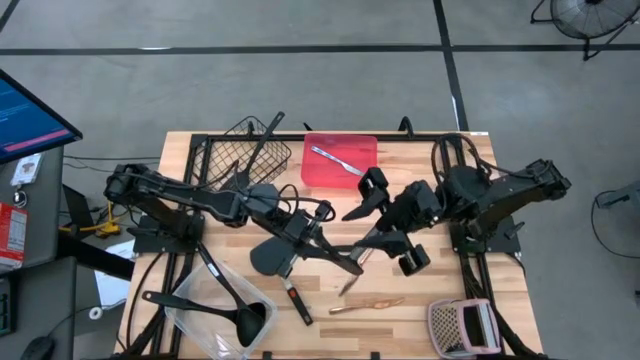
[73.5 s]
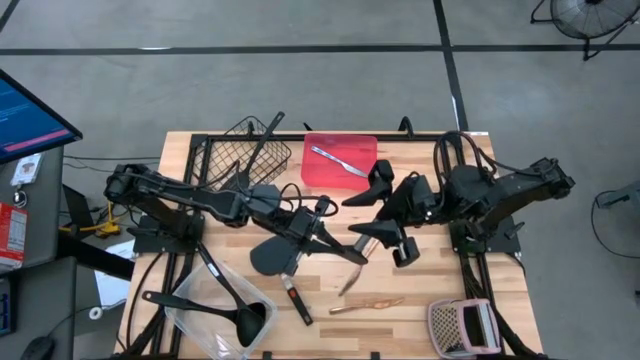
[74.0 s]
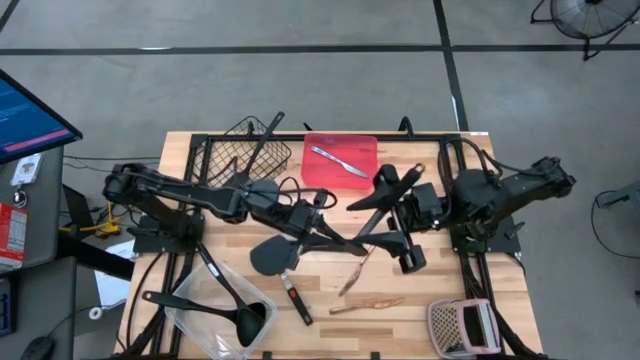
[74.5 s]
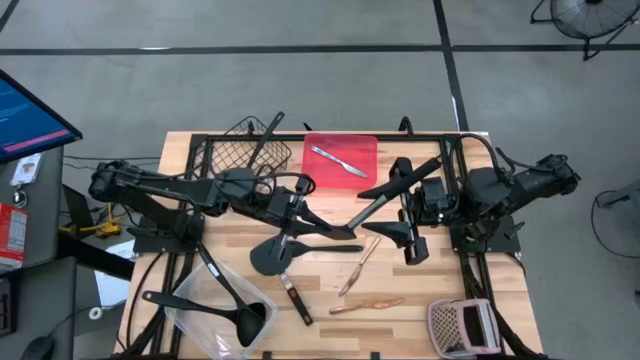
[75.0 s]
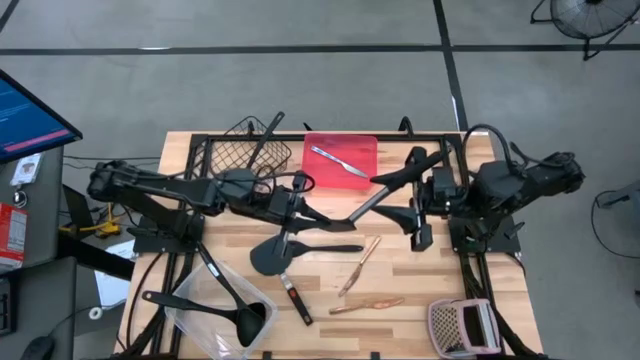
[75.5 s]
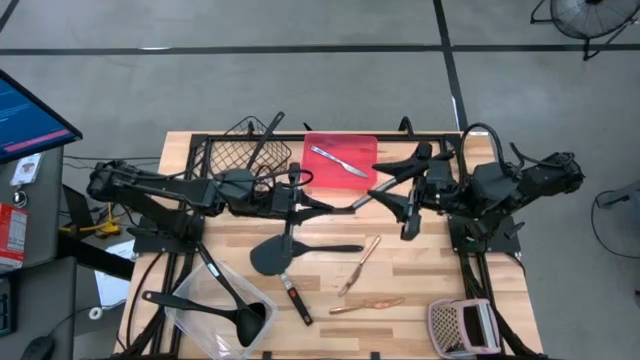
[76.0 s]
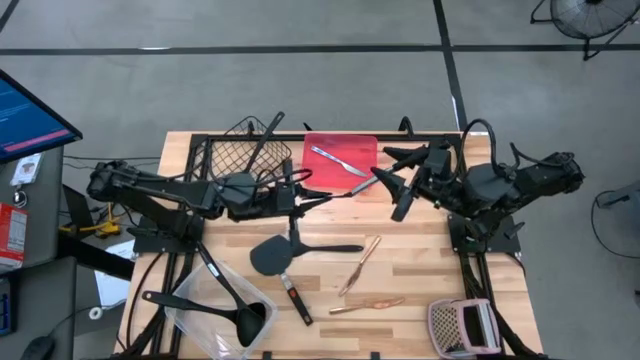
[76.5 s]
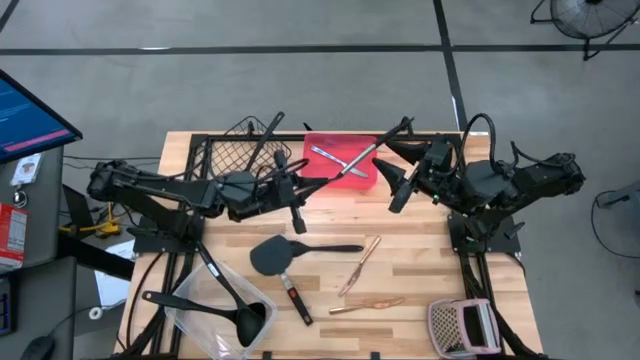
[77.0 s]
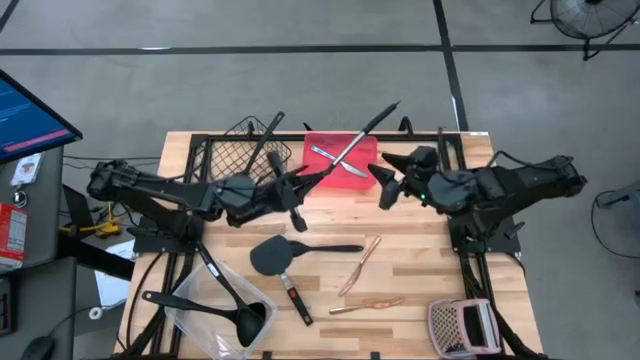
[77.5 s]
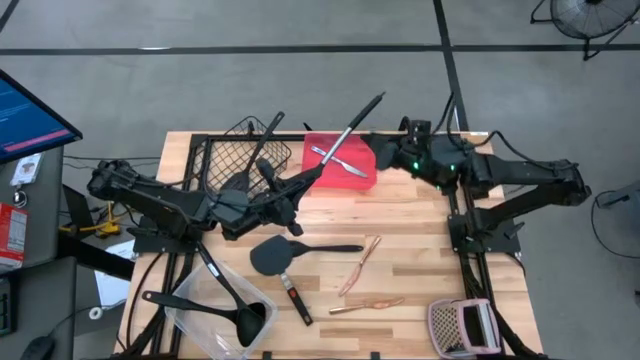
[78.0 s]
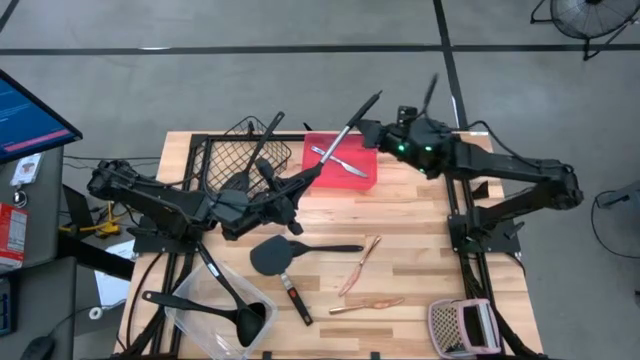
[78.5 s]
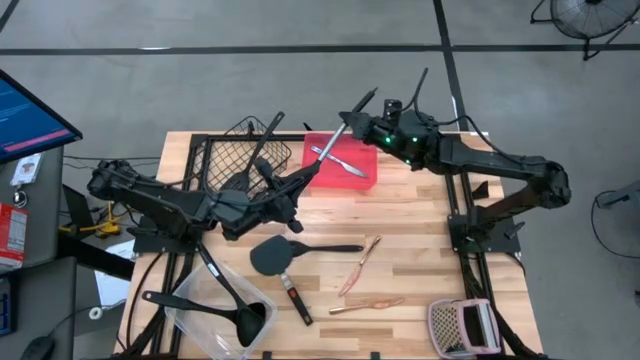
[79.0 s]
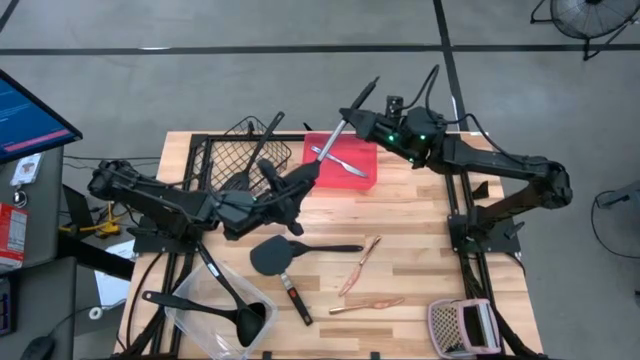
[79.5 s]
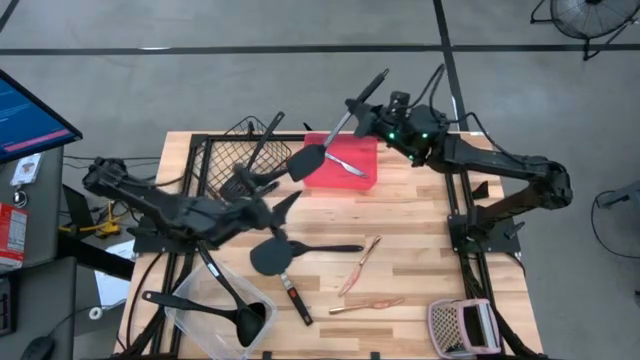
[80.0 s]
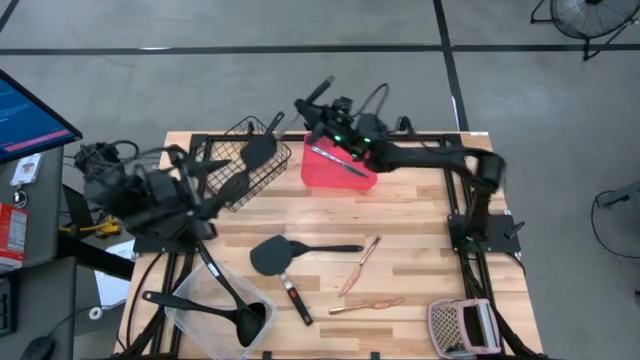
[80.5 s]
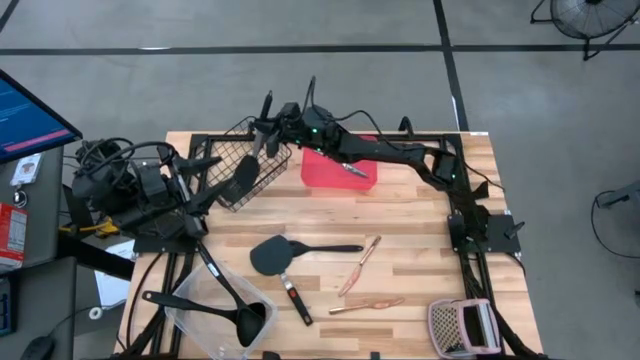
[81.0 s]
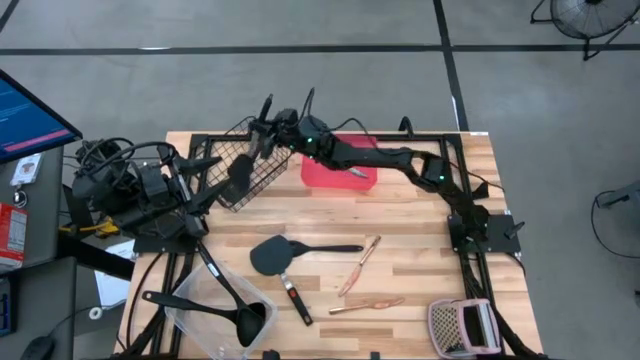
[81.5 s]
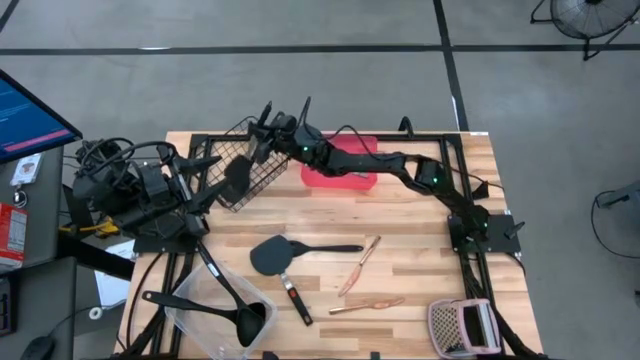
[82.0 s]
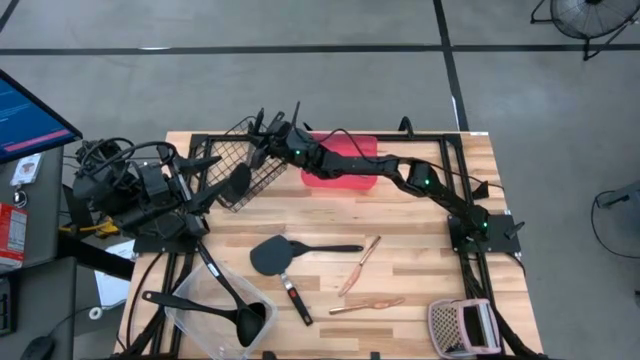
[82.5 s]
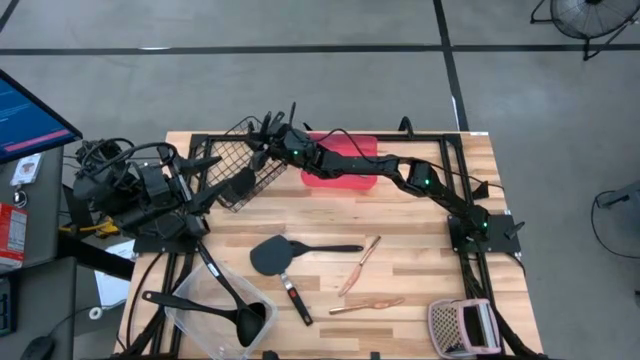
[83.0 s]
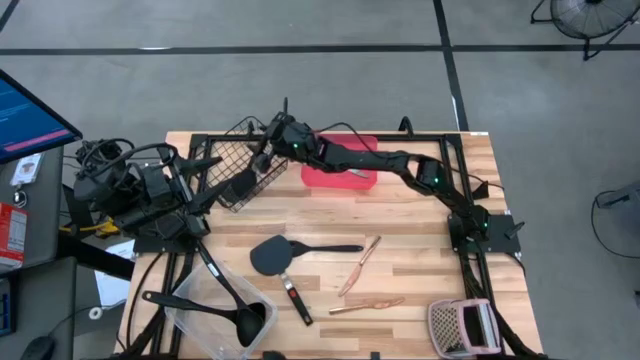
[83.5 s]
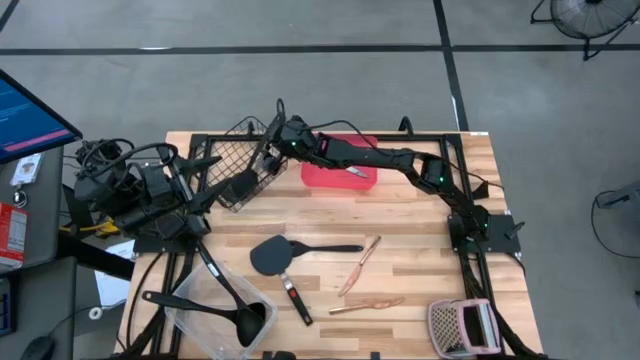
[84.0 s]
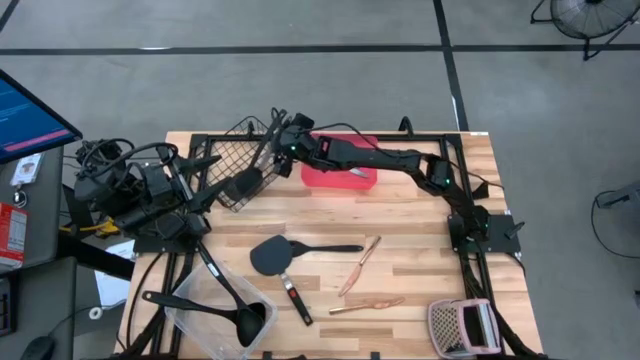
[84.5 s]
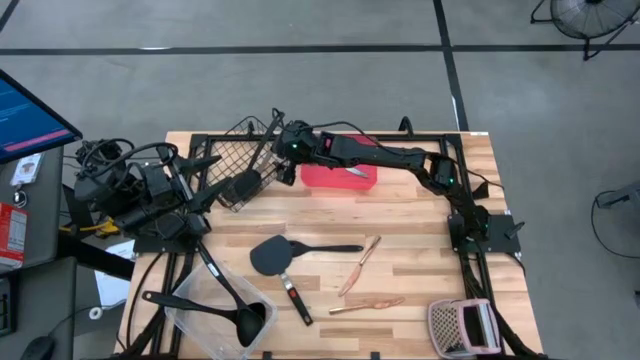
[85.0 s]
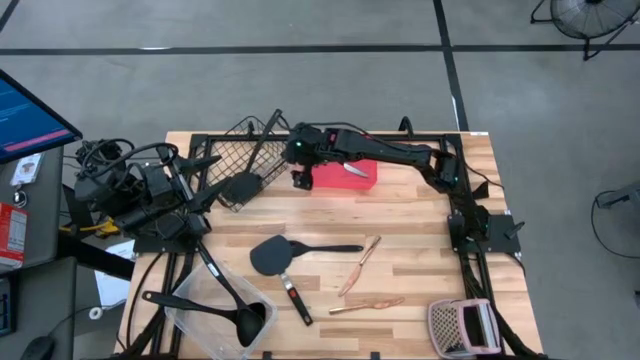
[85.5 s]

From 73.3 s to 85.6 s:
Task: Pick & Place Kitchen Items
Put the spatula into the wire basket

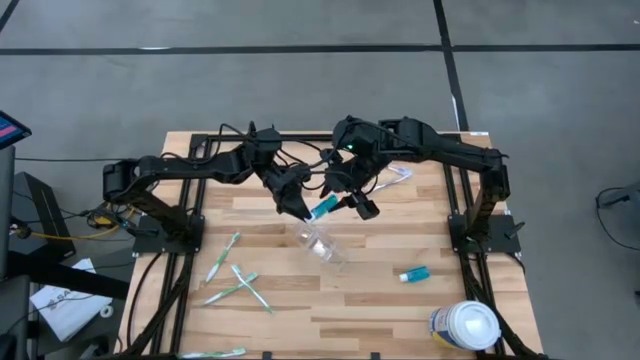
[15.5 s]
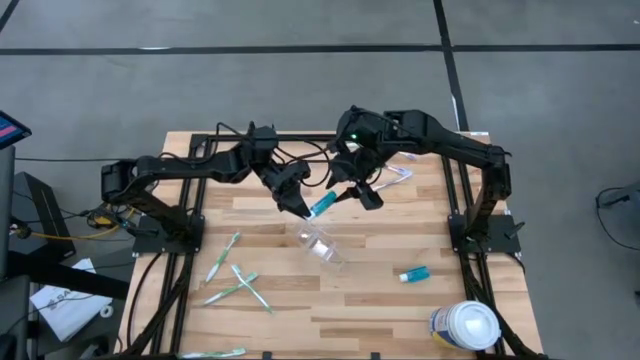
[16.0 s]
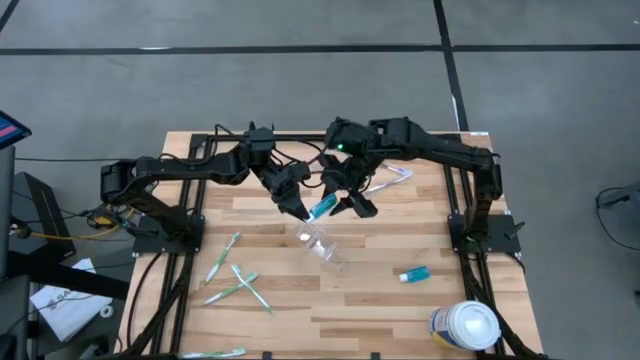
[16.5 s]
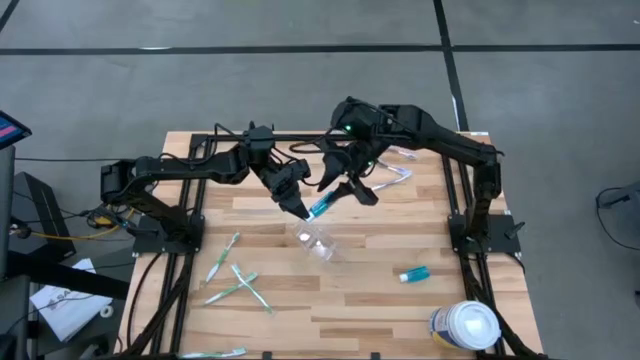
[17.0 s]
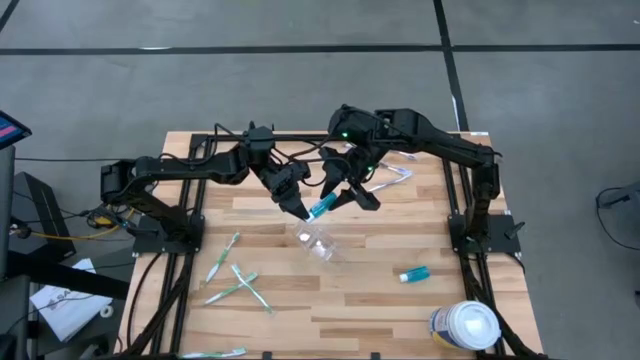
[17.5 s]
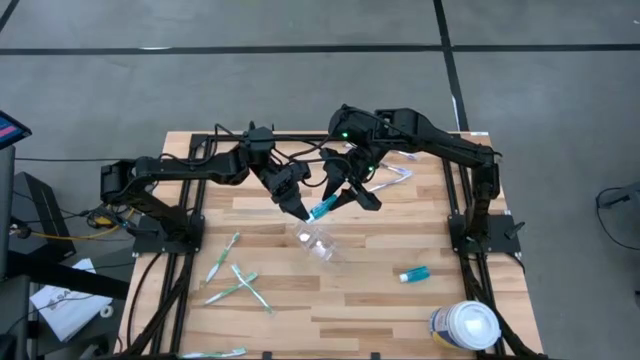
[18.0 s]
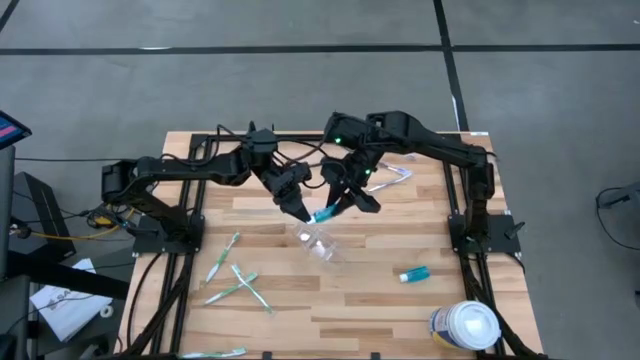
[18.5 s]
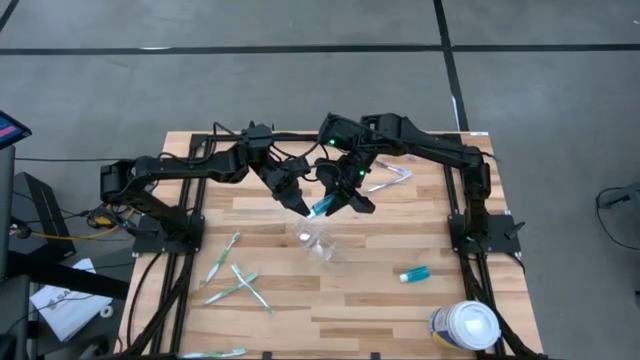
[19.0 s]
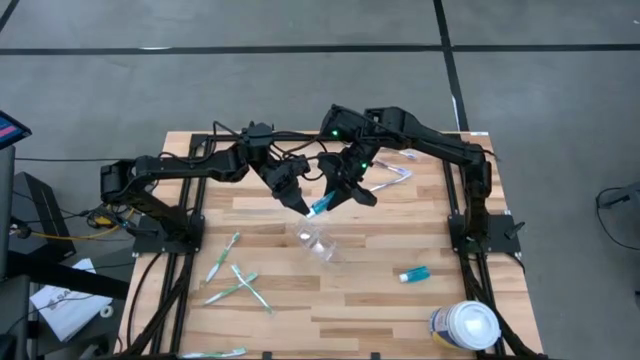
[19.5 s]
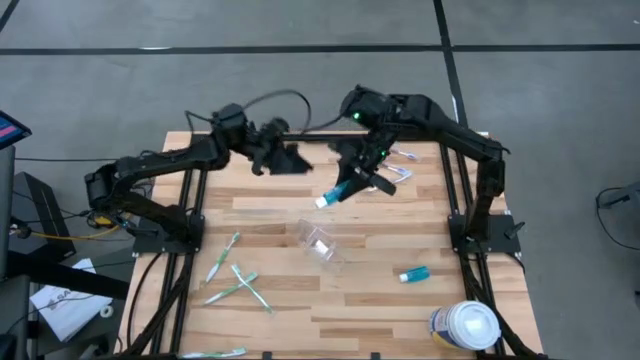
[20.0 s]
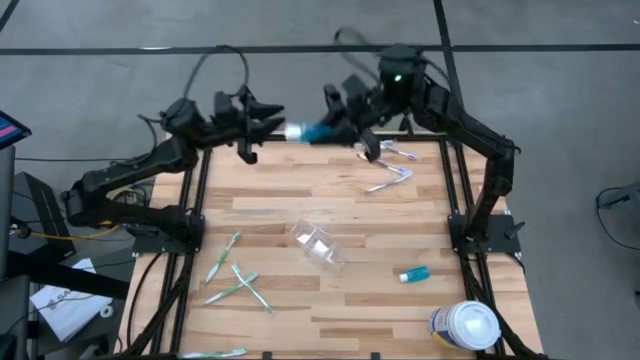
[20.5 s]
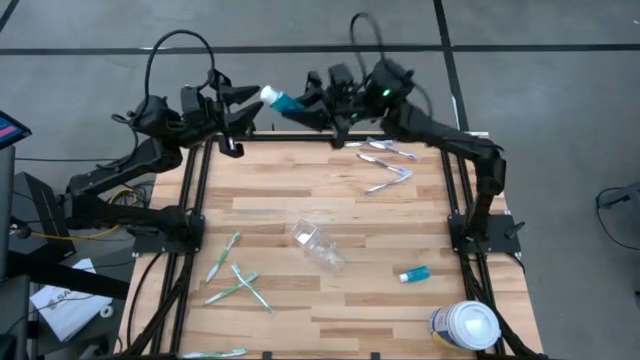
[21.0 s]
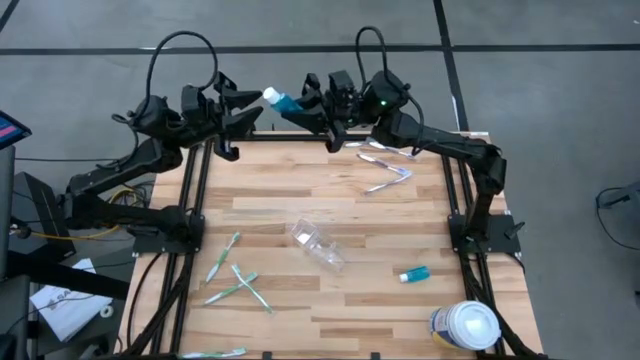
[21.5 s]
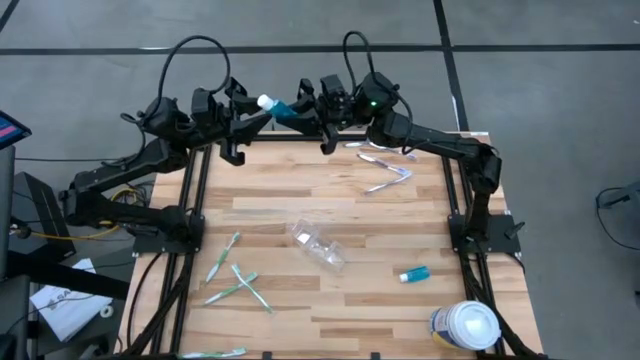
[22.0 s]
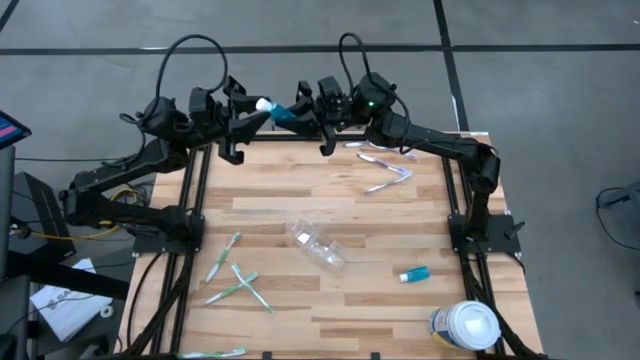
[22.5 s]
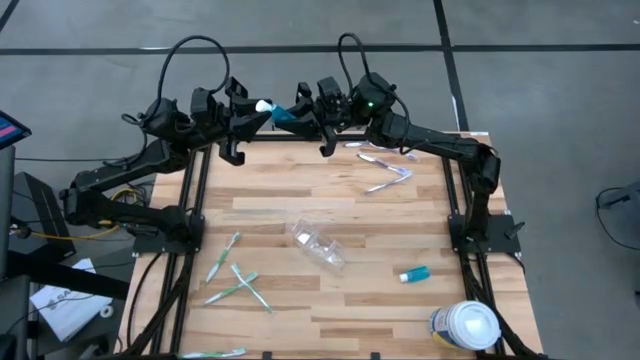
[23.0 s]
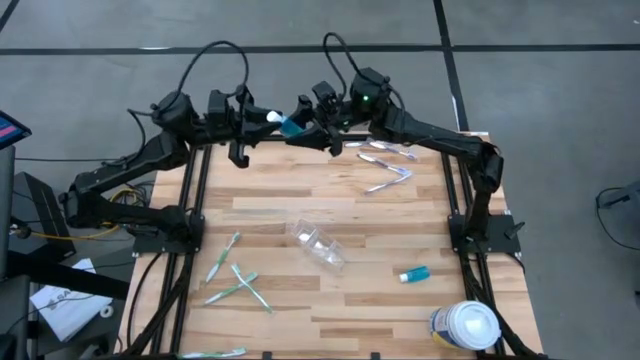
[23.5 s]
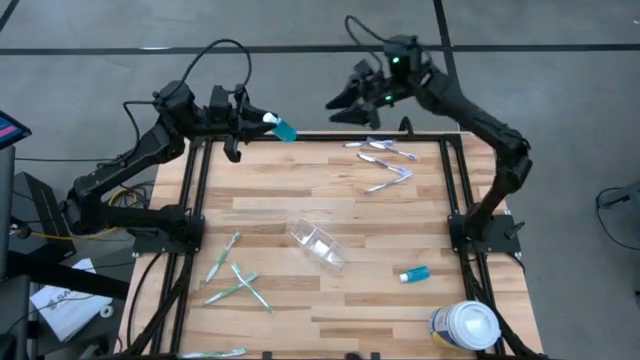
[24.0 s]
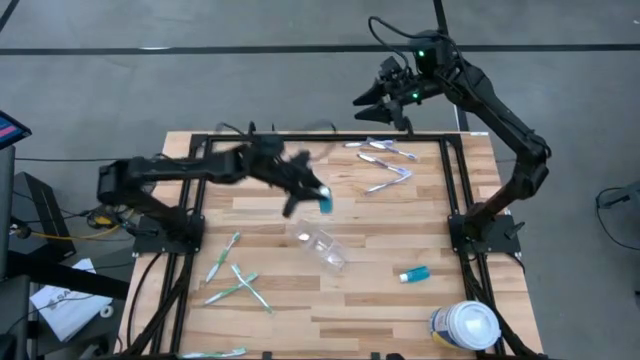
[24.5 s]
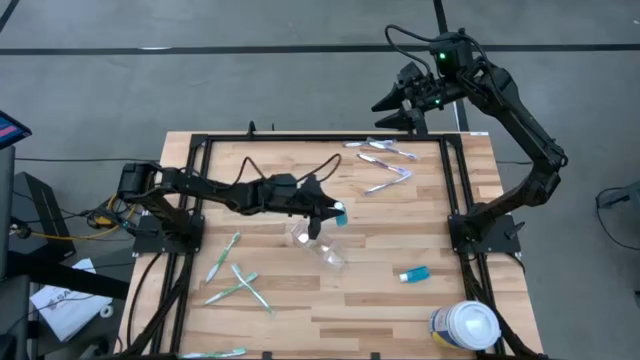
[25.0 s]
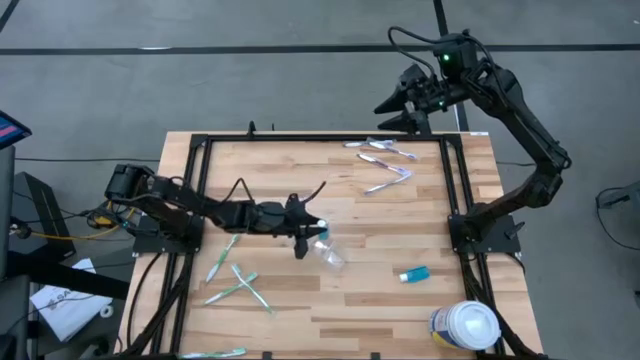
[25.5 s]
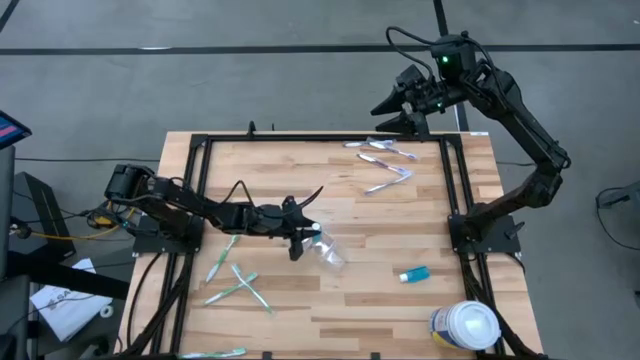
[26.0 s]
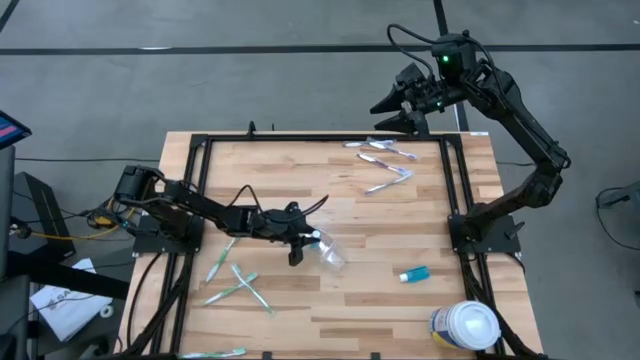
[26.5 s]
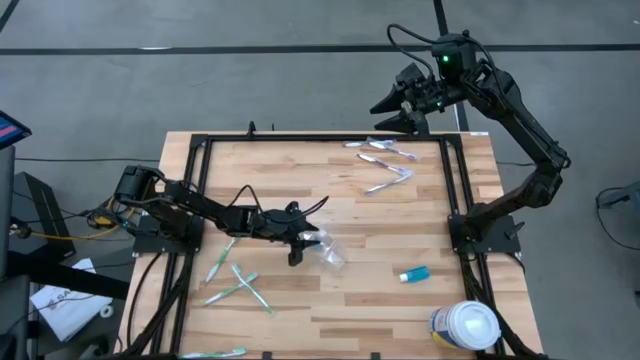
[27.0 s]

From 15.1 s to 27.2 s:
Task: Pick & Place toothbrushing station
Put the blue mouthwash bottle into the transparent organizer
